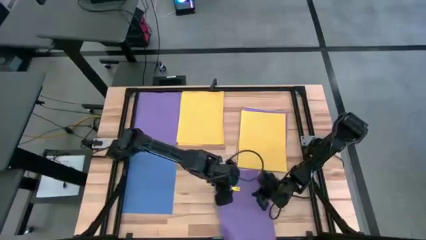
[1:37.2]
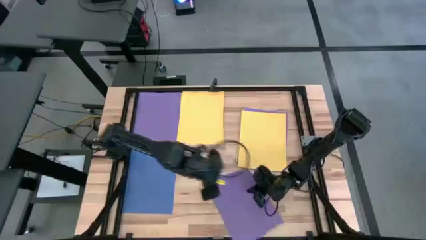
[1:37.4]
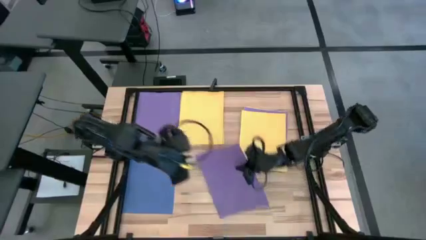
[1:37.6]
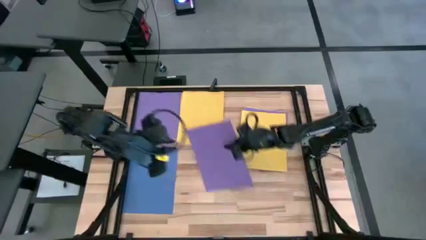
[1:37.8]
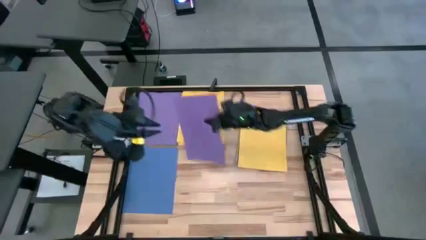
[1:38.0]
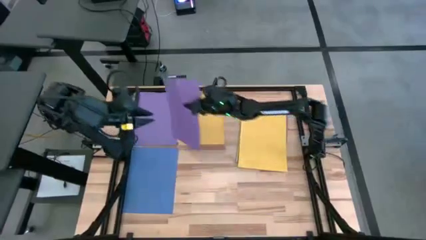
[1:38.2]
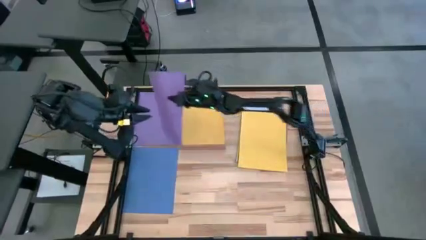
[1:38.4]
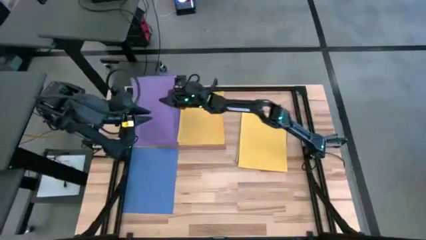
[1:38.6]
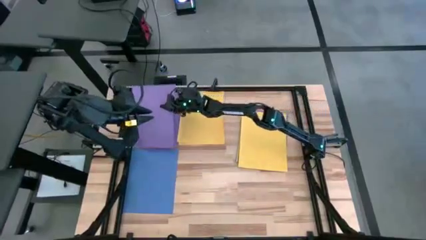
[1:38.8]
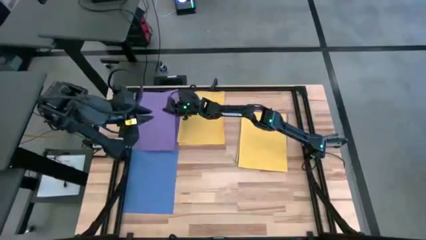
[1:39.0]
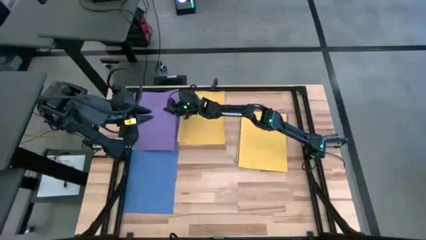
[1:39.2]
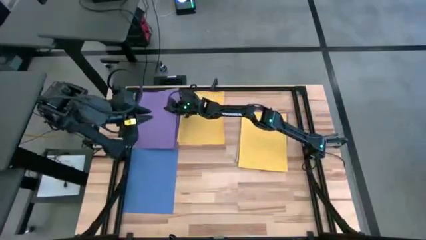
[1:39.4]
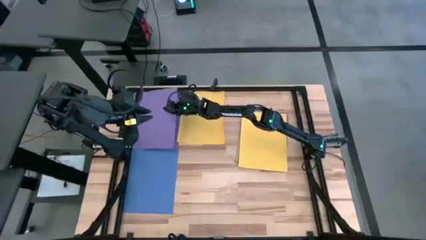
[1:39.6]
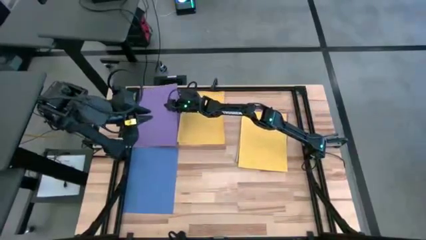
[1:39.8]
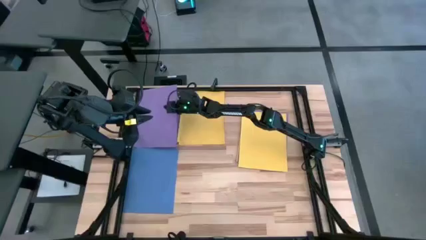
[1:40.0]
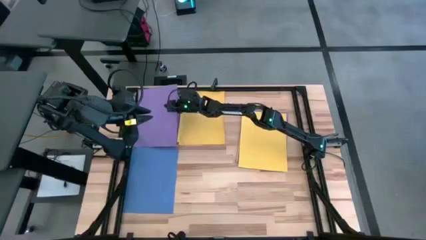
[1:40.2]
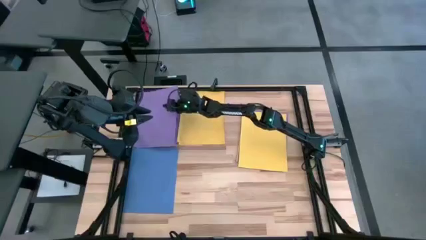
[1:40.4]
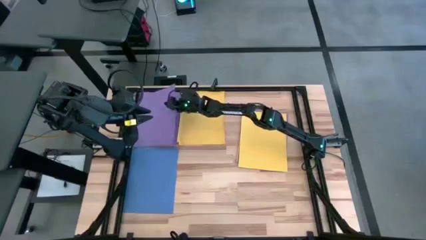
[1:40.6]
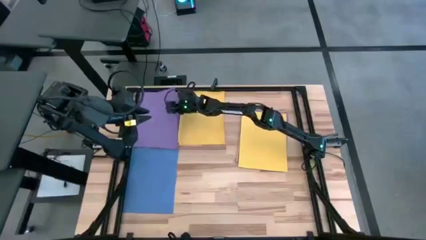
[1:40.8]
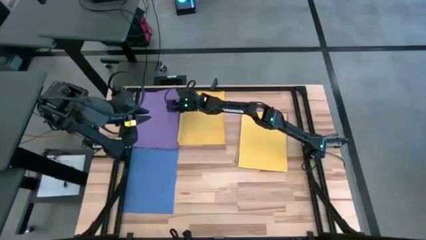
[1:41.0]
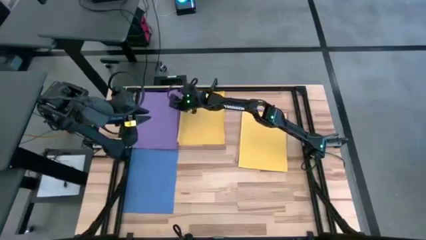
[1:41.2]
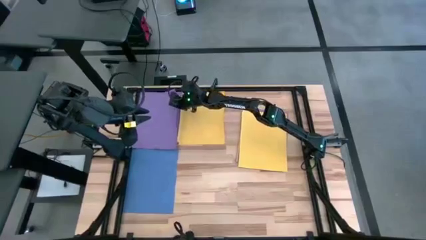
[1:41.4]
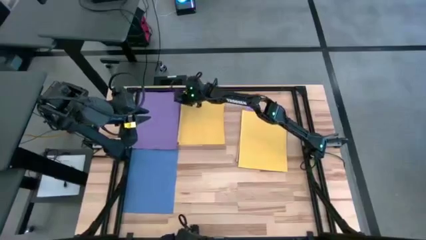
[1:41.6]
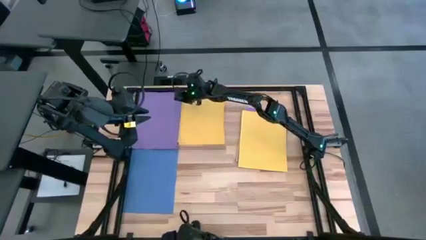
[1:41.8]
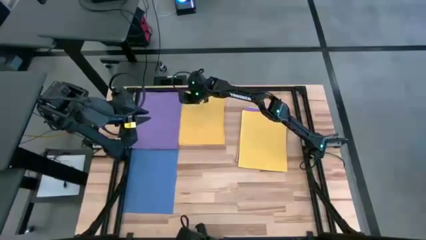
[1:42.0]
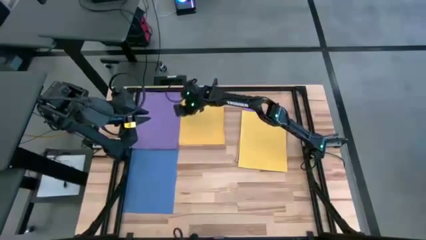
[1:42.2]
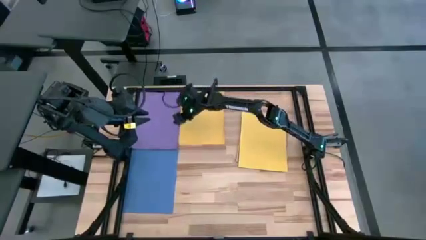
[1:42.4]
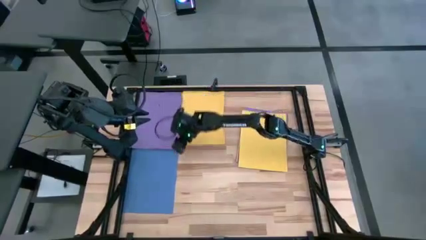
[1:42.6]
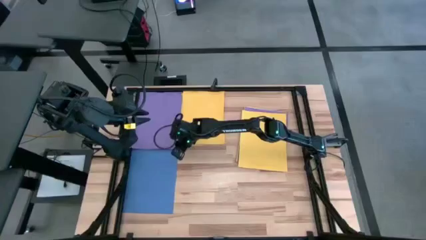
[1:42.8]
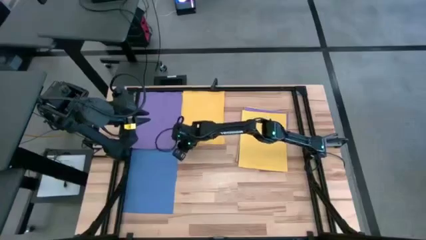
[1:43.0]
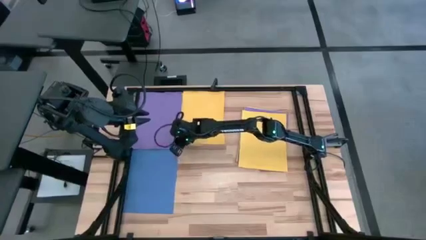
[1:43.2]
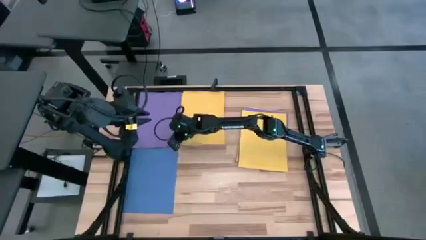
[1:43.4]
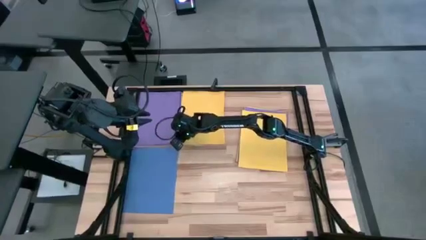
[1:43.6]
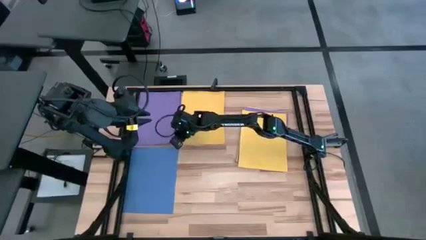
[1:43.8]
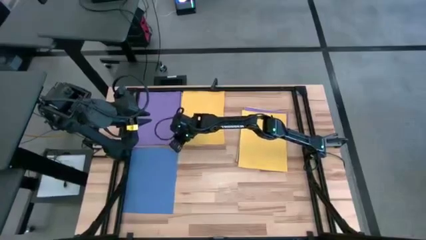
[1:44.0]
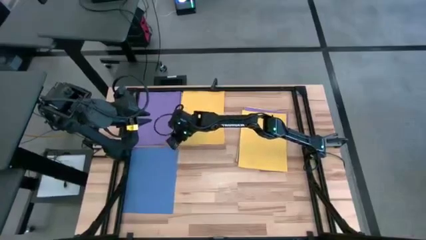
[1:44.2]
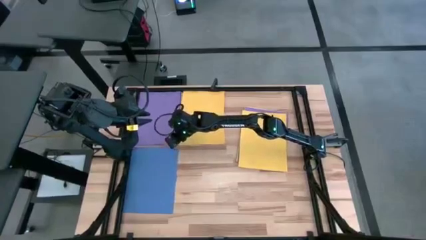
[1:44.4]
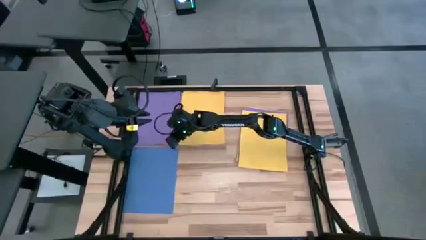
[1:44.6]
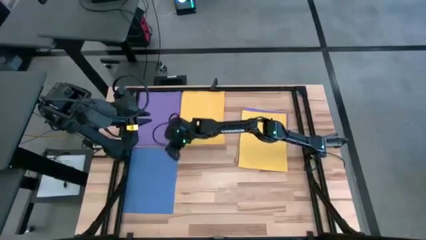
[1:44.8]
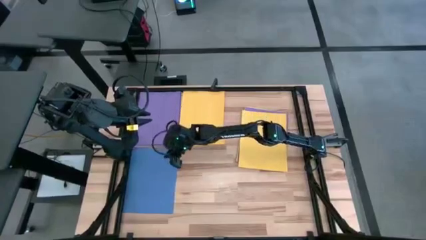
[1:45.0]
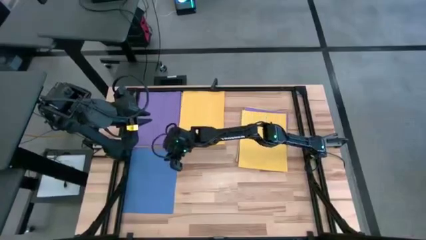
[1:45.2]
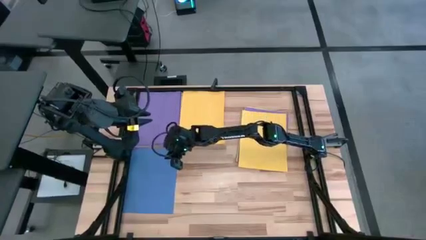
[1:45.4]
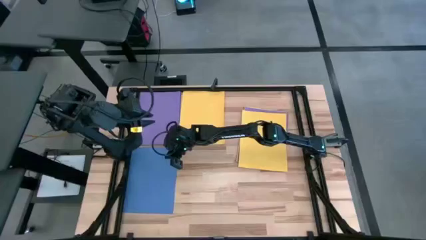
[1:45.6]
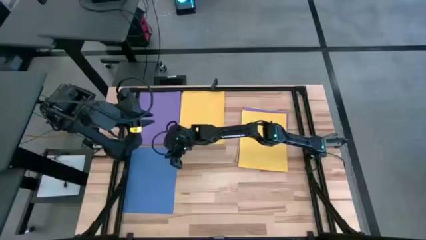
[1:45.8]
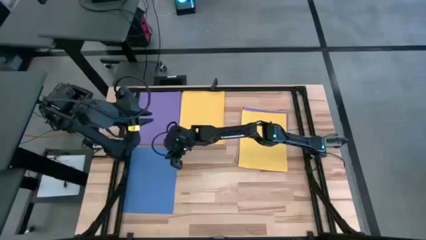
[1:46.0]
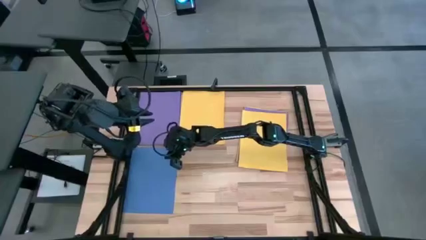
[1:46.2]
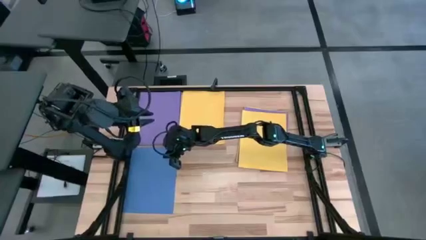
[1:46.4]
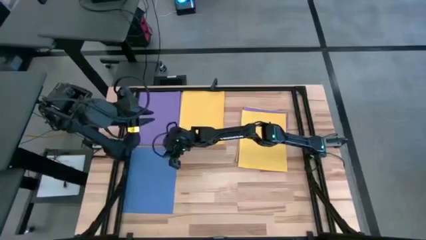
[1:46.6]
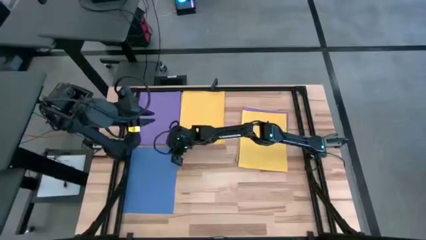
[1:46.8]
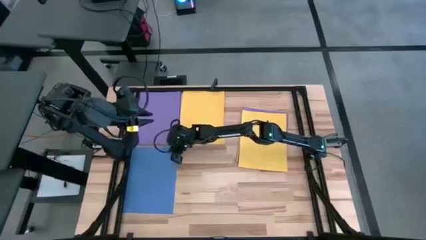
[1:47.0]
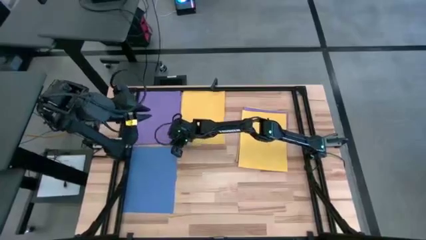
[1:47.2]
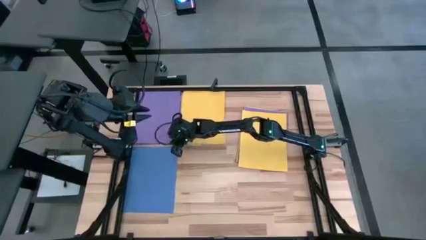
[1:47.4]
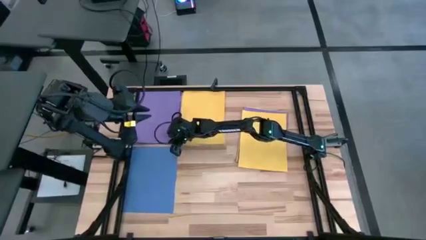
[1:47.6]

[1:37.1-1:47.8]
Task: Organize paper
Stack the purple paper on top of the purple paper

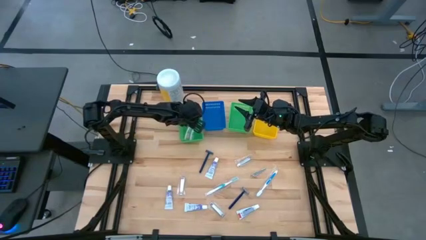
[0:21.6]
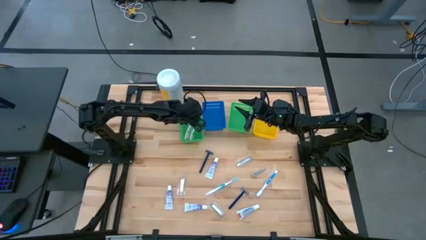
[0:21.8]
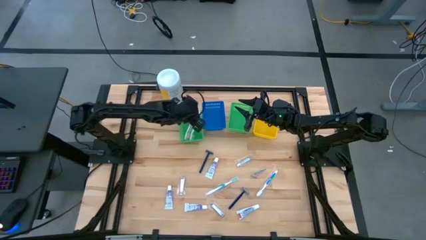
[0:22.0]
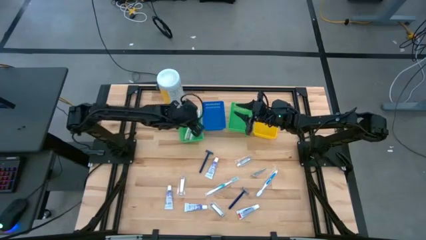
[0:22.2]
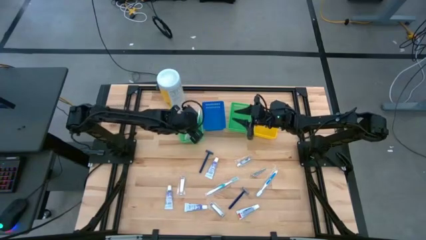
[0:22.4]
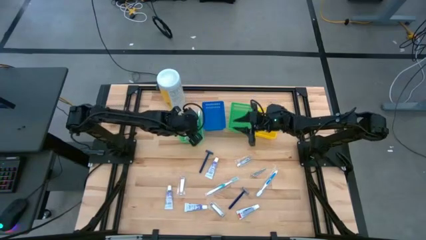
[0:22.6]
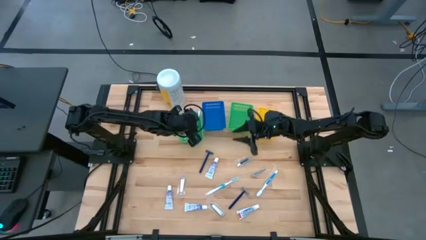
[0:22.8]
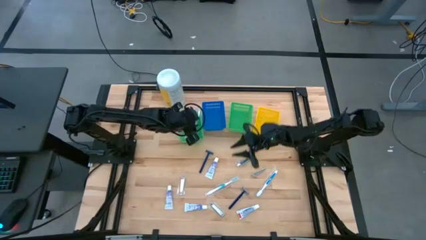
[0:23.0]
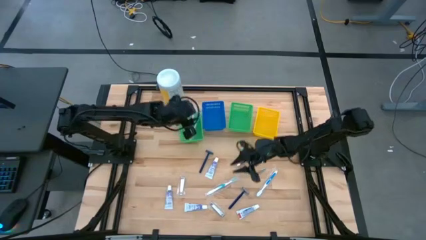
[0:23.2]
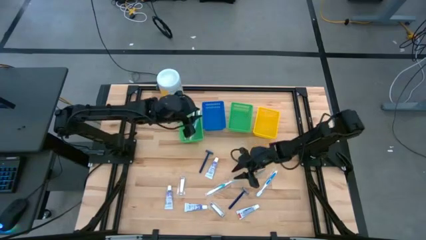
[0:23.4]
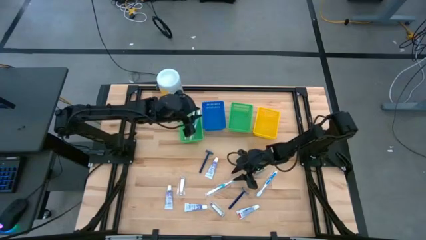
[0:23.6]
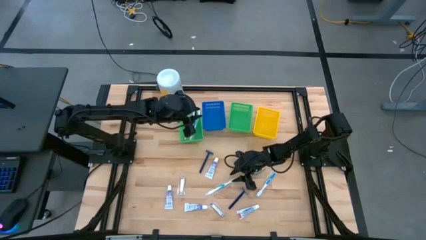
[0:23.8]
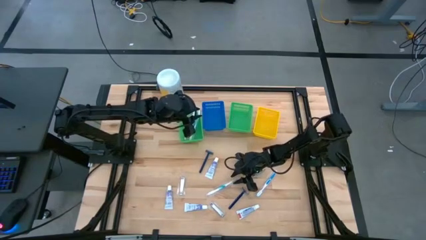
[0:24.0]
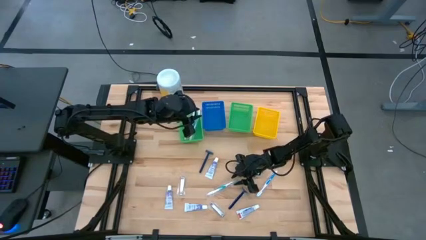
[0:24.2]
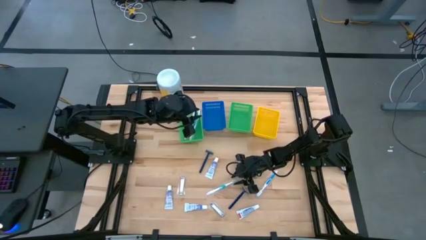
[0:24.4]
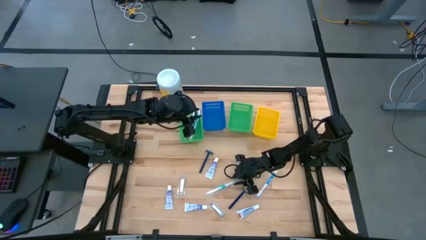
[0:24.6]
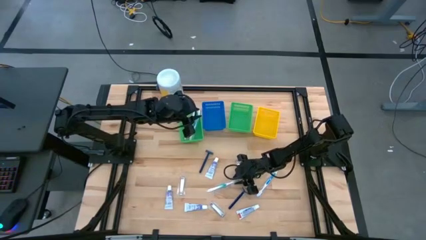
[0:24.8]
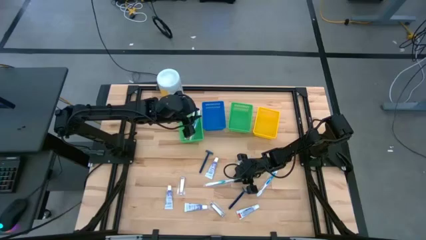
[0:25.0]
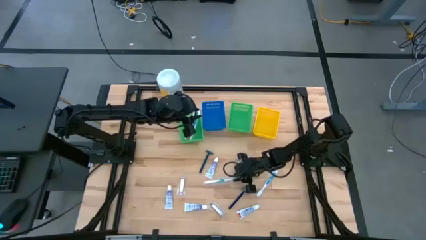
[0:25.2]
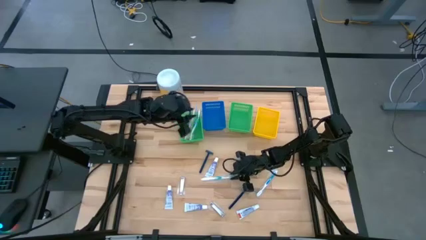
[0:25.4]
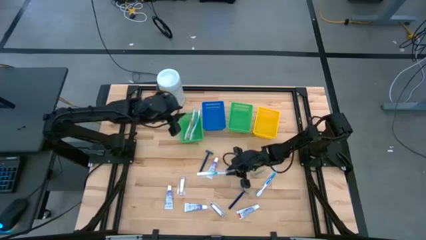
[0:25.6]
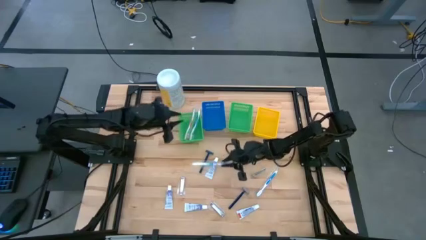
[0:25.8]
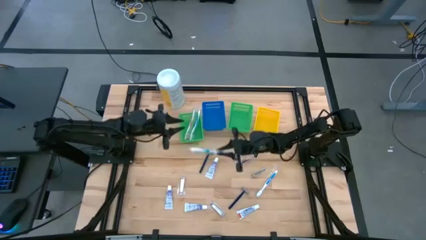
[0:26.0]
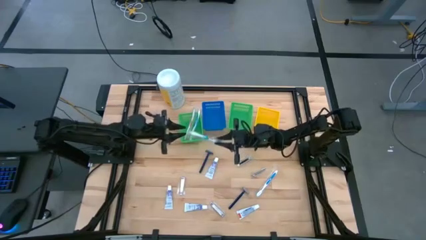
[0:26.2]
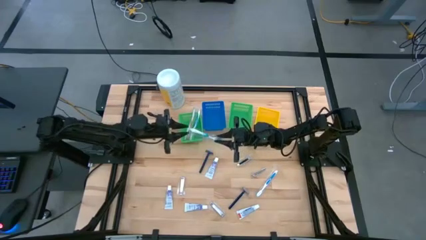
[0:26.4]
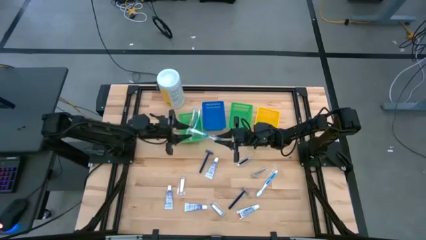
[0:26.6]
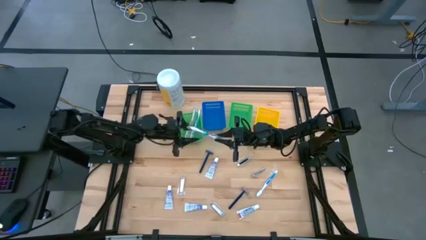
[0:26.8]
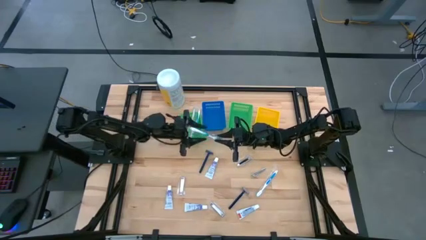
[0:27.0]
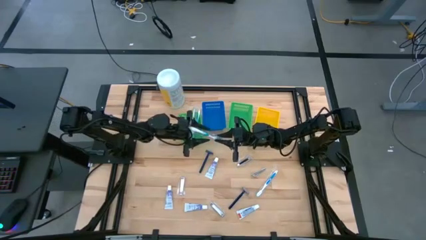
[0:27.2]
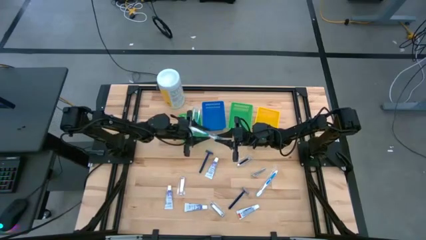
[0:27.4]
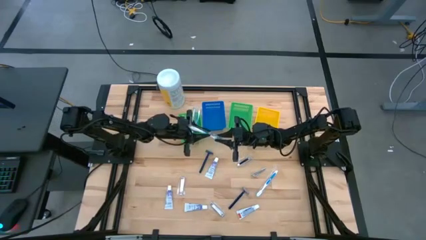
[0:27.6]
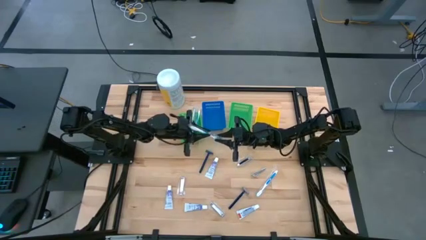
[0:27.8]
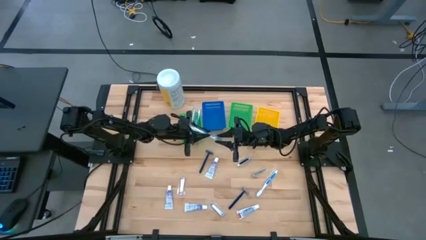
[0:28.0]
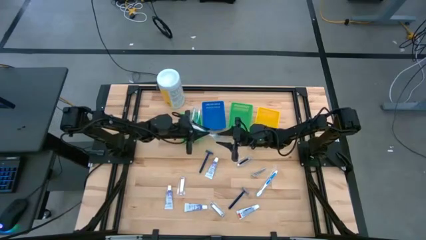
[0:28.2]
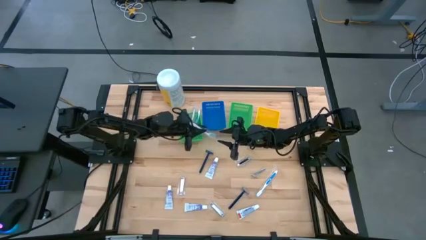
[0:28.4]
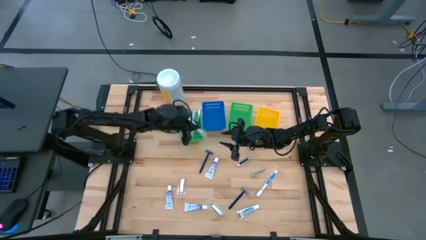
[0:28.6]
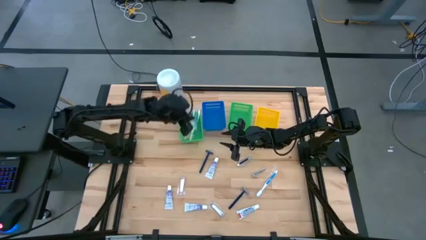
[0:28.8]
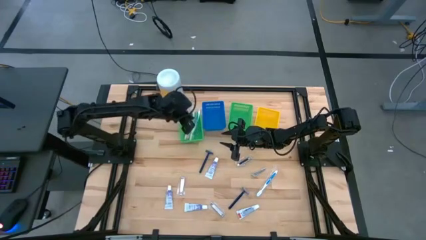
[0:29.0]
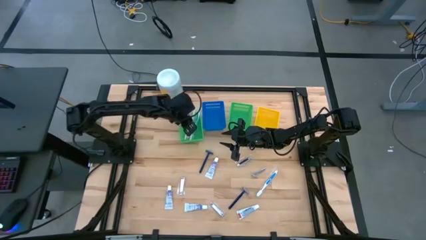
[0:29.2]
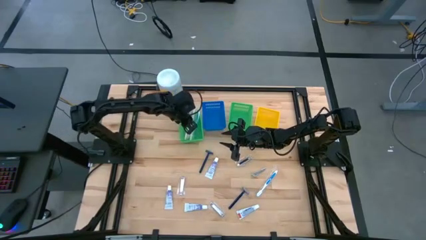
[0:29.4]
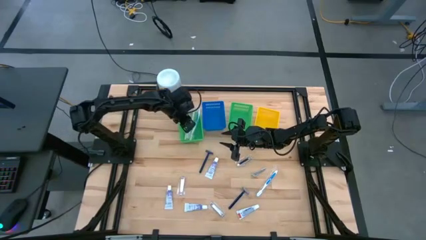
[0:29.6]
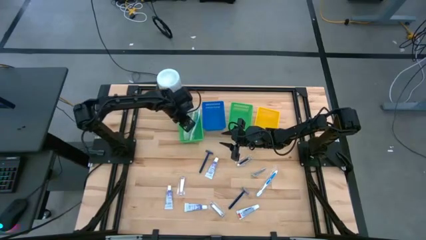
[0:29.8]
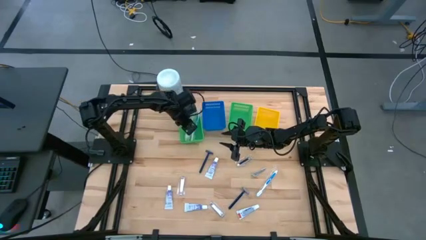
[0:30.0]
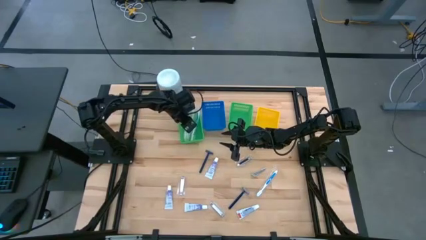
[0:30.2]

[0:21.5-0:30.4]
Task: Pick & Place Travel size toiletries
Put the blue toothbrush into the left green basket
